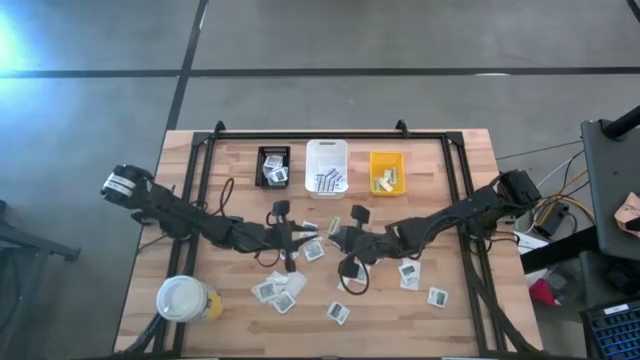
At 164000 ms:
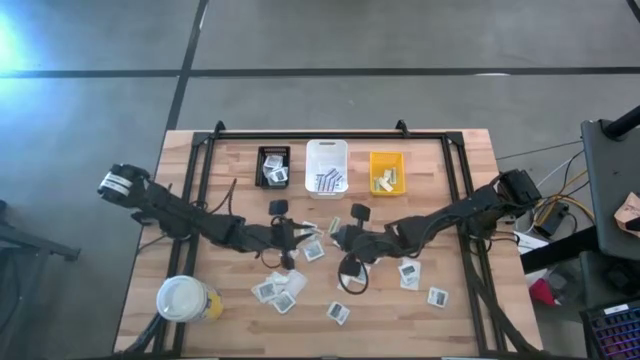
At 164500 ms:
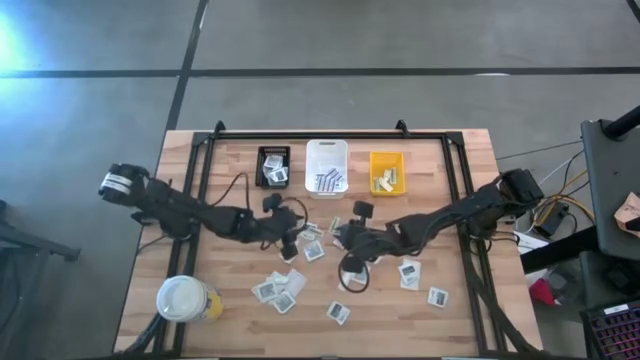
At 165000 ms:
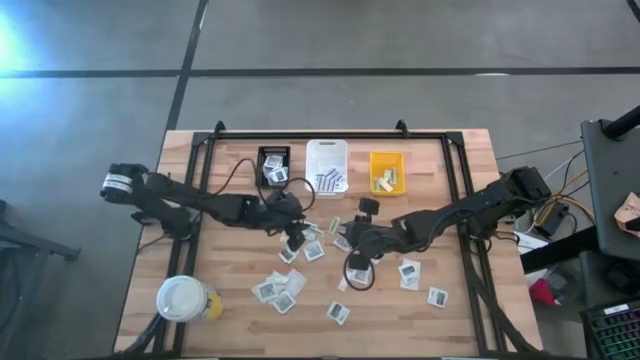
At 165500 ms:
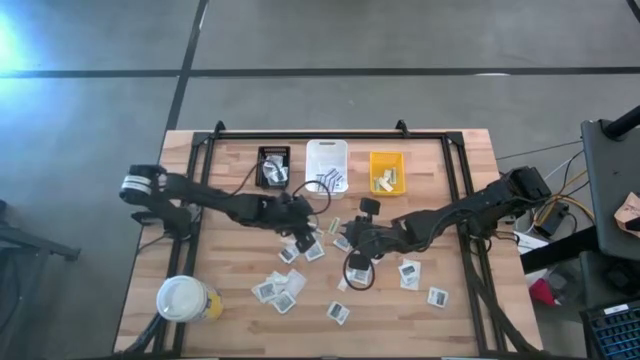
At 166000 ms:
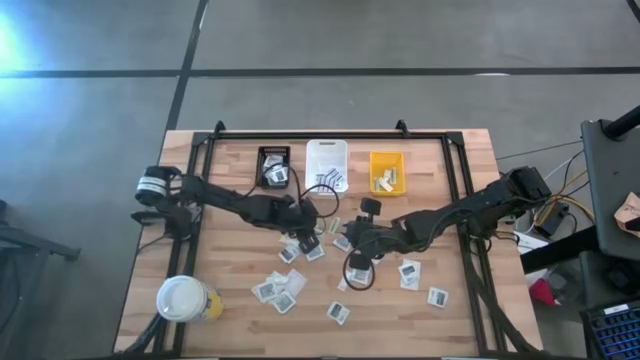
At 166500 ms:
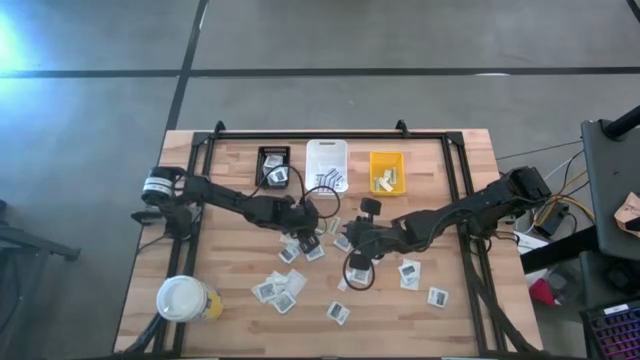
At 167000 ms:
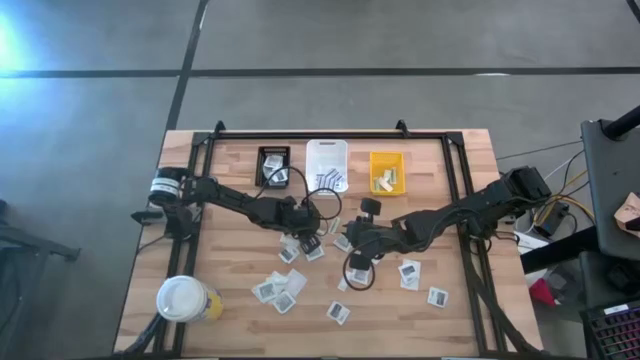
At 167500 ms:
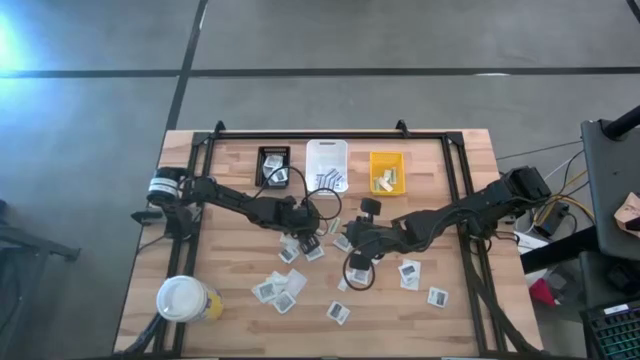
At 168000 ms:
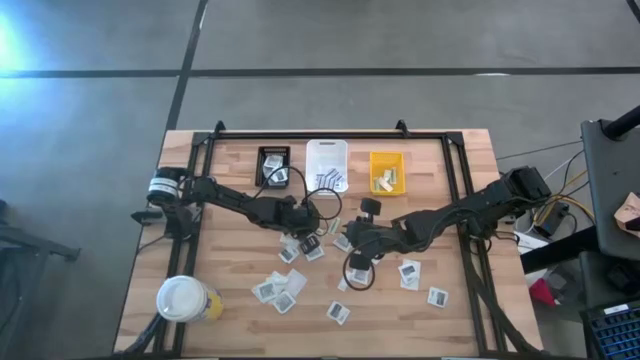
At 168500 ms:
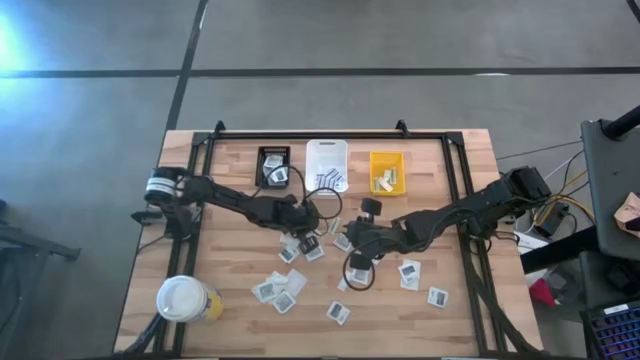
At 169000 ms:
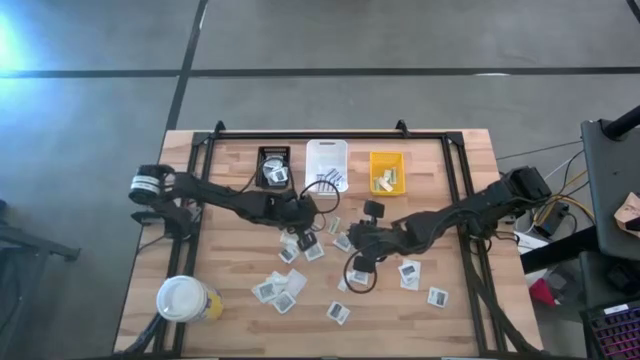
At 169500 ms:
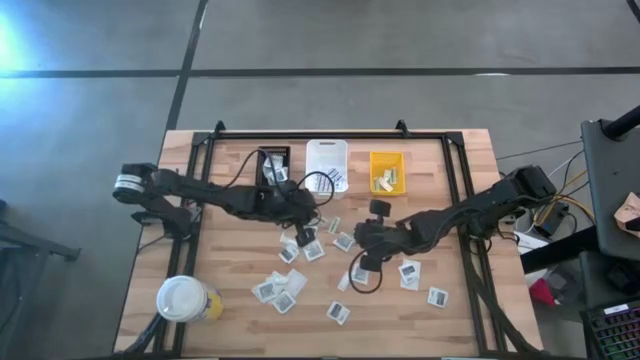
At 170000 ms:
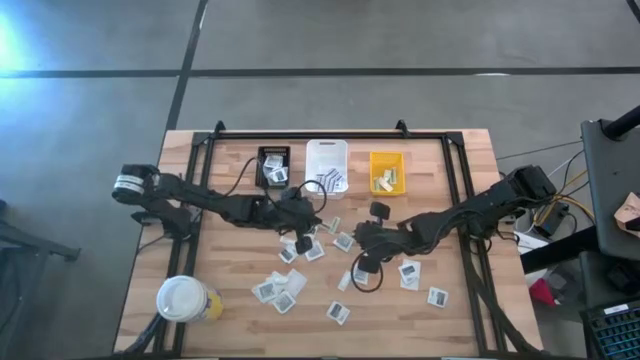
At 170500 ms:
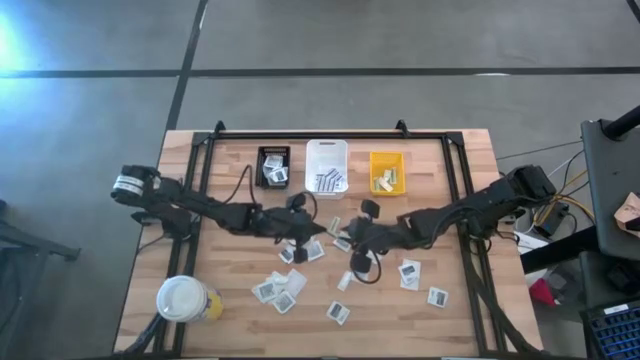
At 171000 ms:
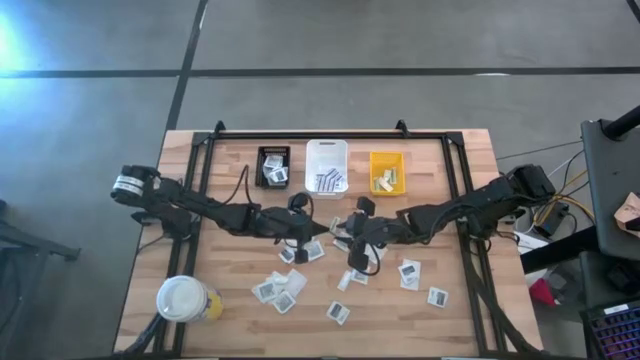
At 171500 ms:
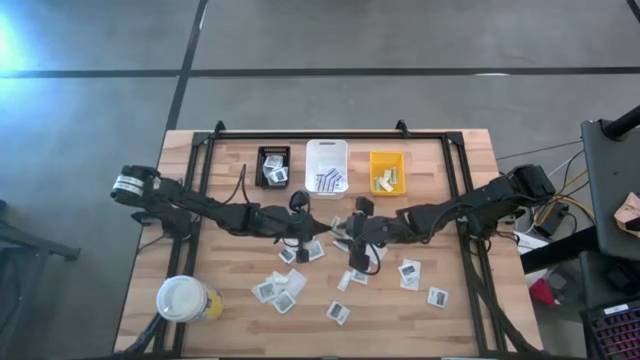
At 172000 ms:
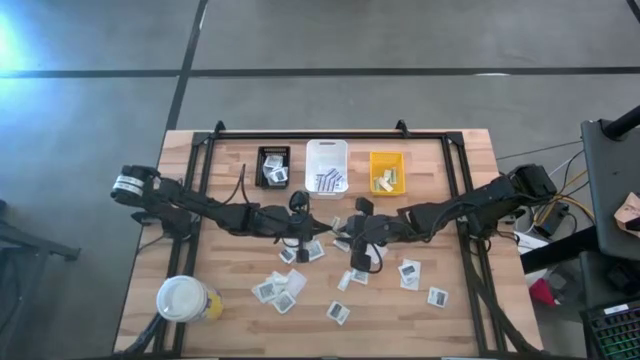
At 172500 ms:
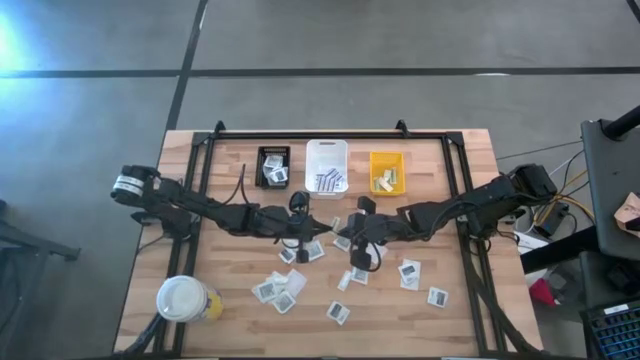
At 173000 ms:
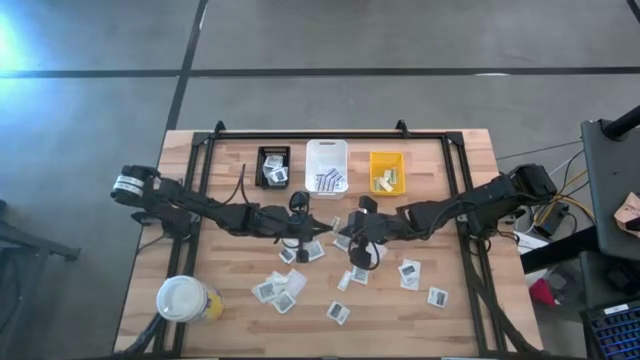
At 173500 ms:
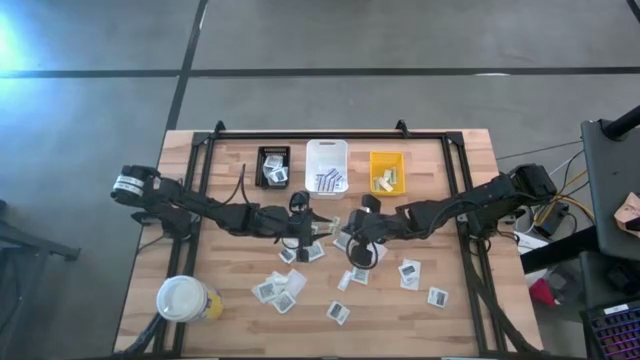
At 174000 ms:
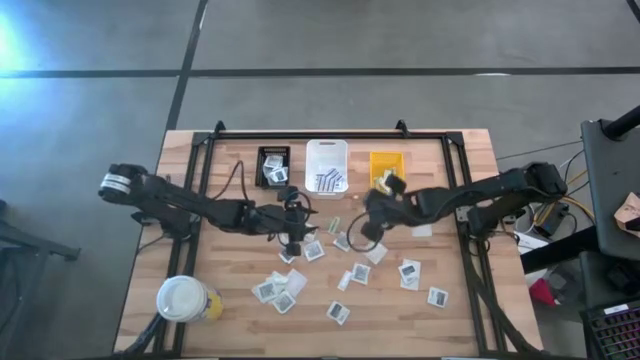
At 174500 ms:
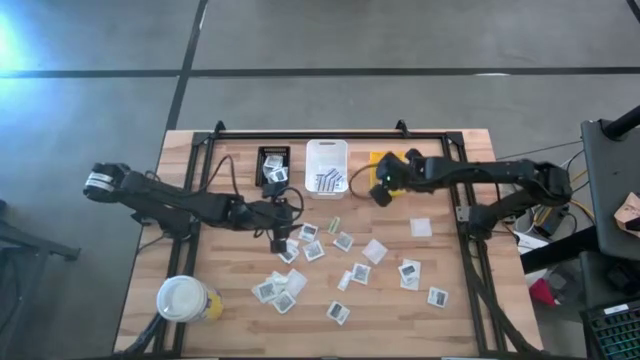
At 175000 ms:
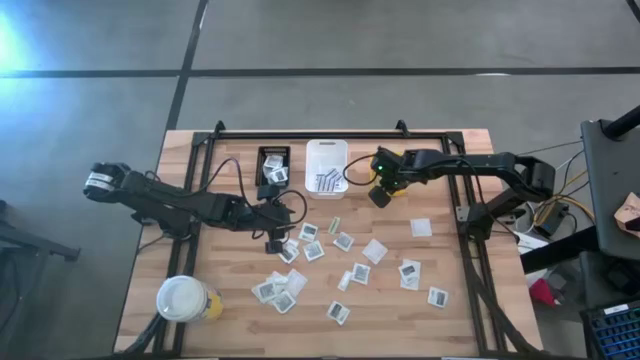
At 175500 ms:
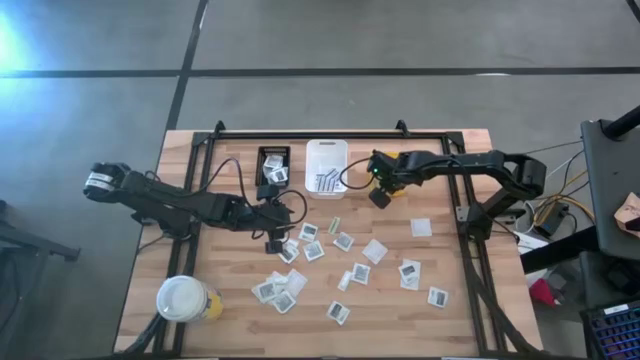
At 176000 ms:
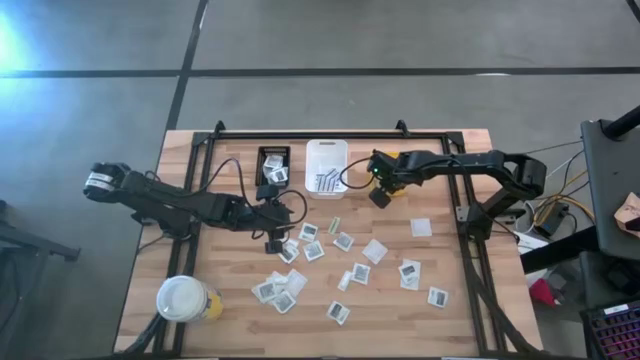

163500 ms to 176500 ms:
Task: Pick & Place First Aid Supplies
Put the green bandage into the yellow basket

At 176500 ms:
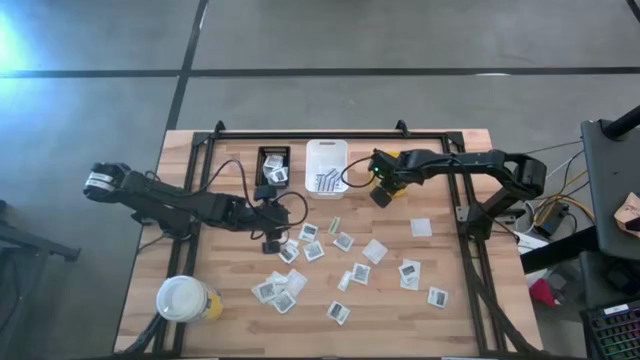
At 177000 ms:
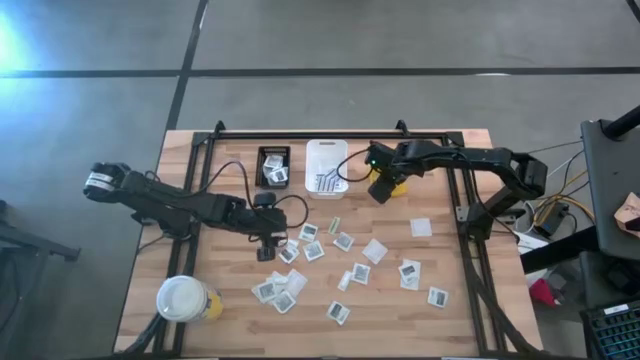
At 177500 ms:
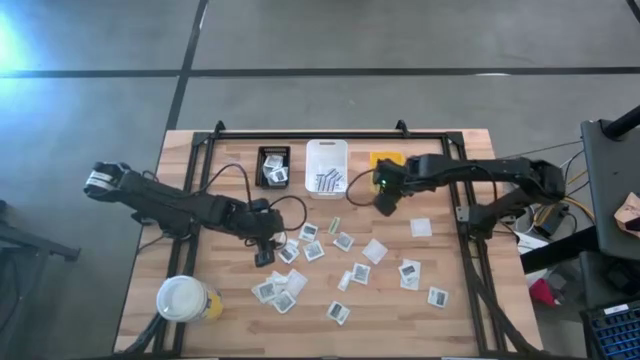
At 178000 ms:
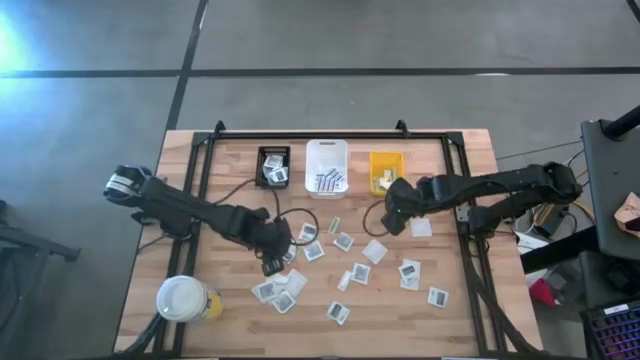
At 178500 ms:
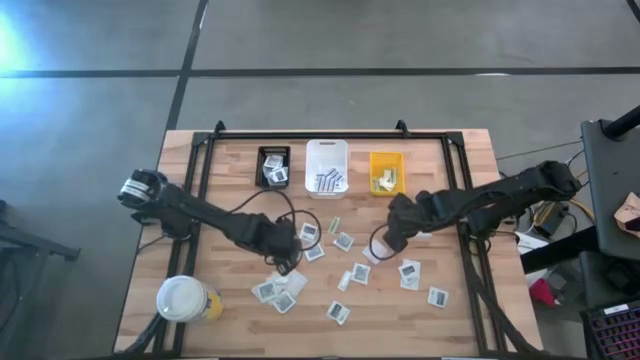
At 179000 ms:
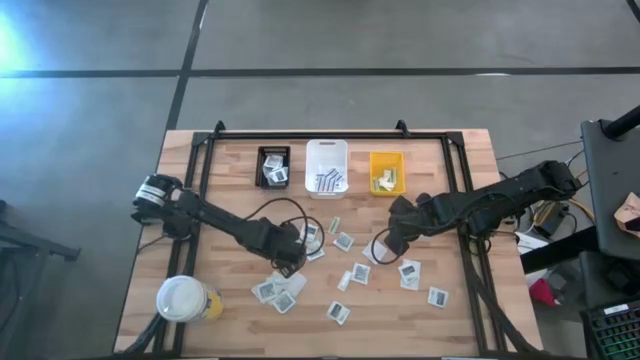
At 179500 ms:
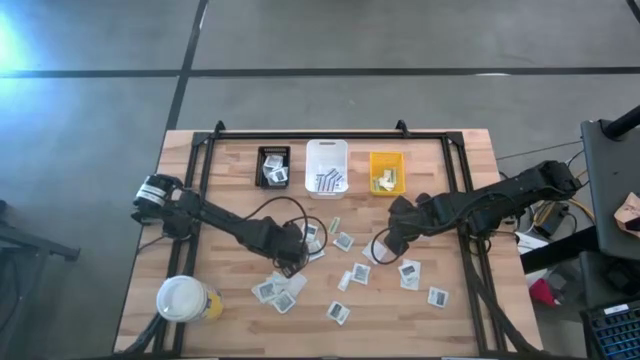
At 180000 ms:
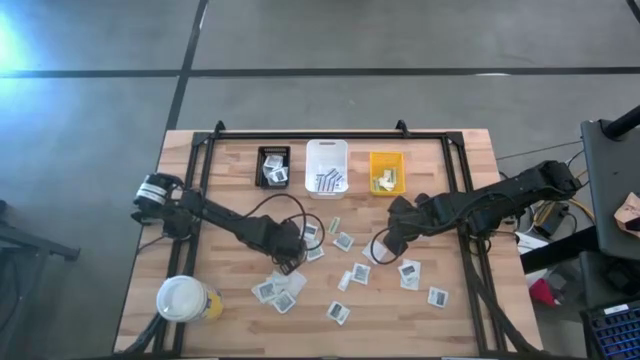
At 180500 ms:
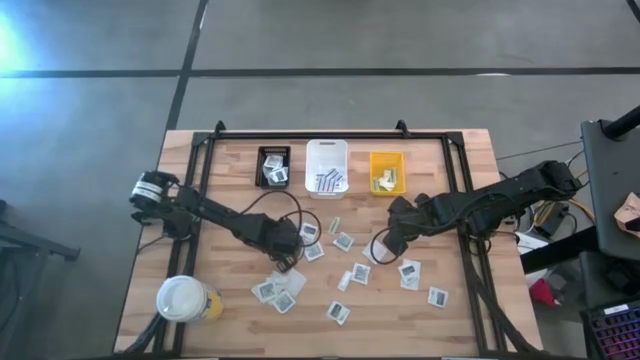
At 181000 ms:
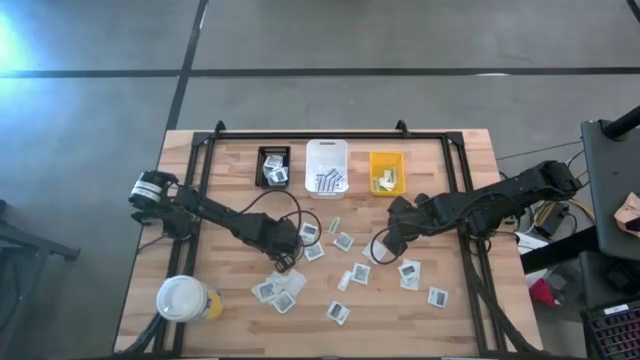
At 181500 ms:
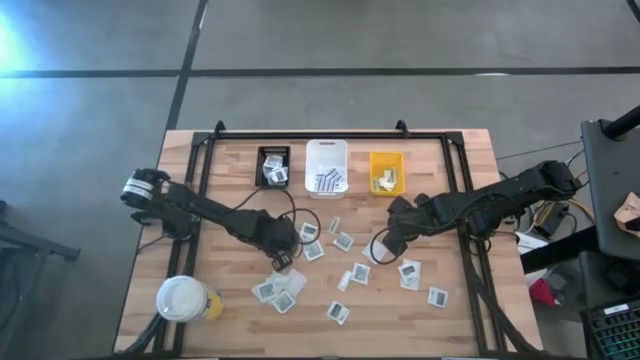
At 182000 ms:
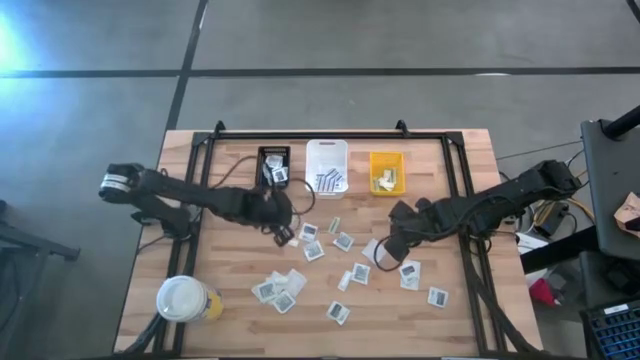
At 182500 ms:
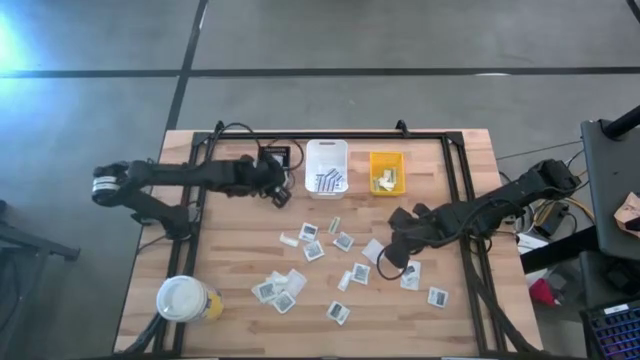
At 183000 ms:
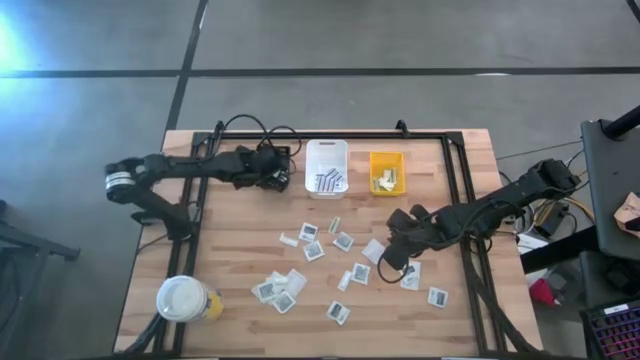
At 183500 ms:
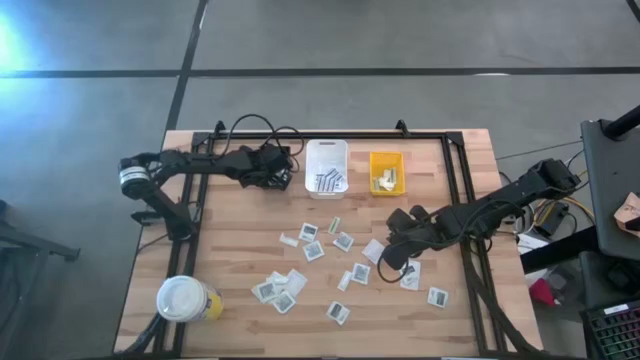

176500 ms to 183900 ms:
Put the towelette pack into the black basket

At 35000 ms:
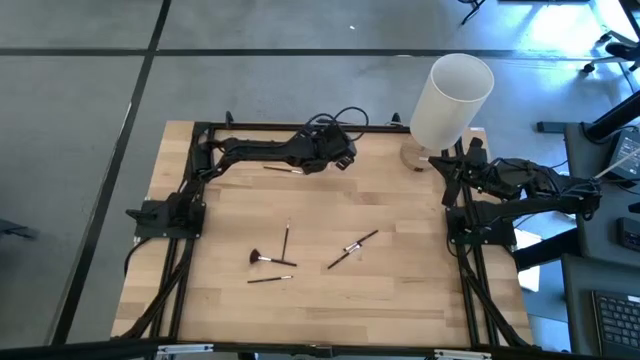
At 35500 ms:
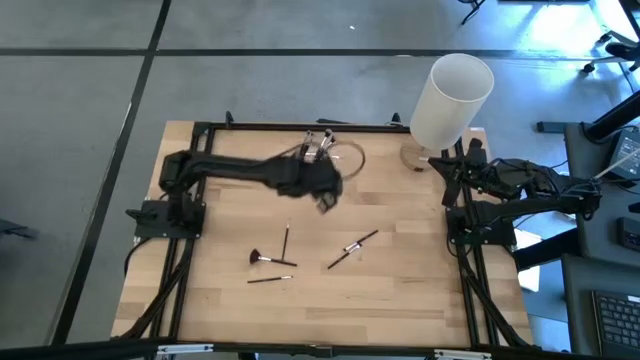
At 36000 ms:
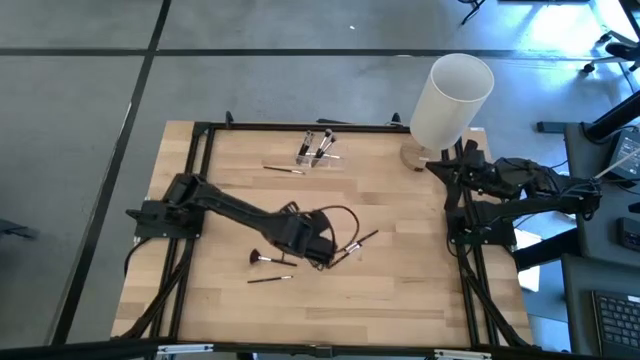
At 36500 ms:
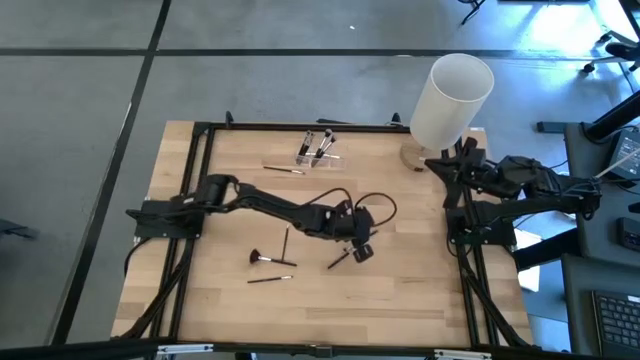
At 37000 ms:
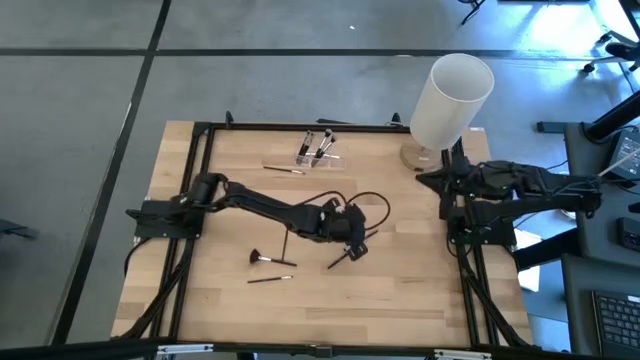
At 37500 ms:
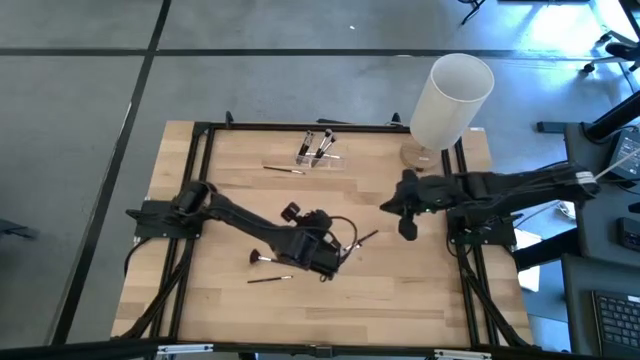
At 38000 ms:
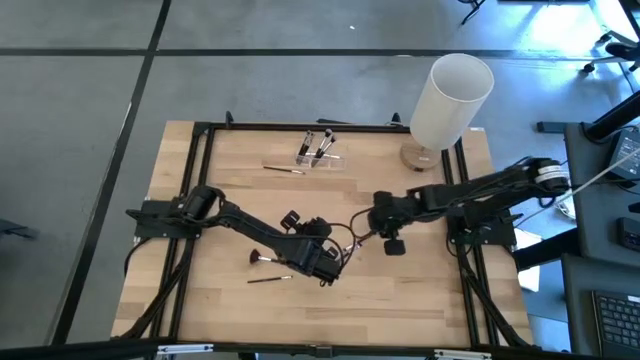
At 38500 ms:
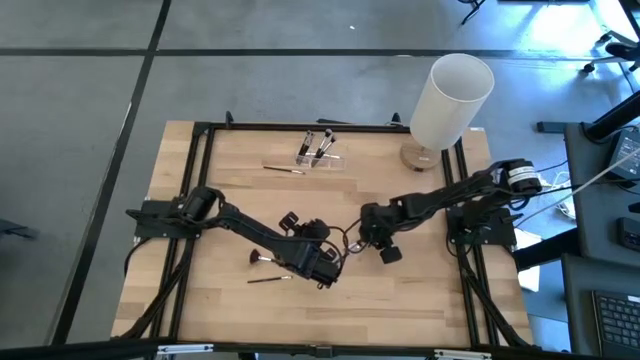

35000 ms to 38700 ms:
Task: Pick & Place Makeup Brushes
Put the eyeshadow brush into the transparent organizer
